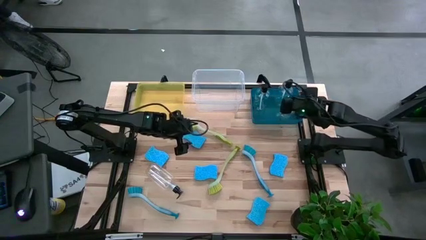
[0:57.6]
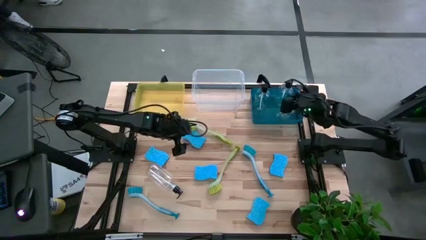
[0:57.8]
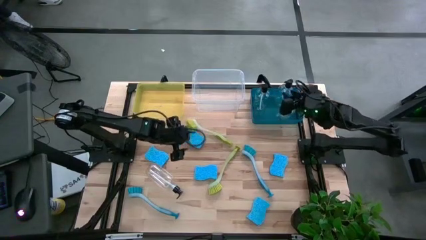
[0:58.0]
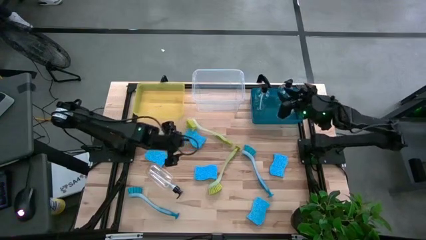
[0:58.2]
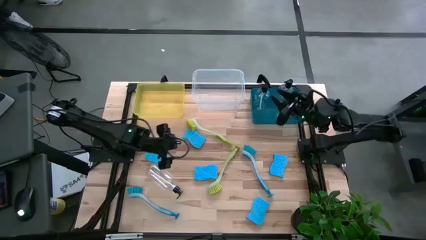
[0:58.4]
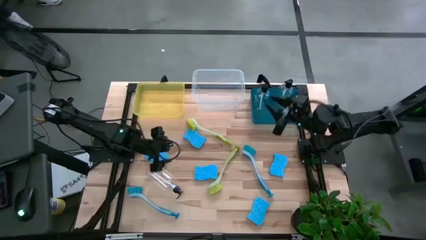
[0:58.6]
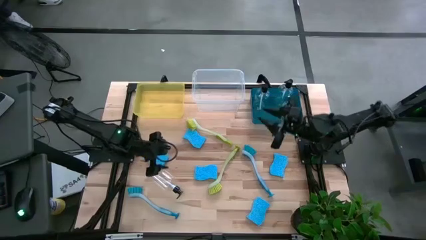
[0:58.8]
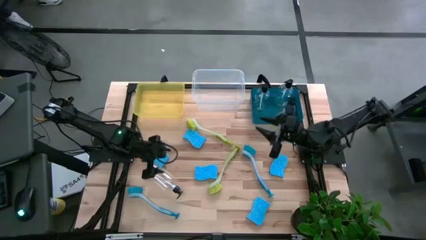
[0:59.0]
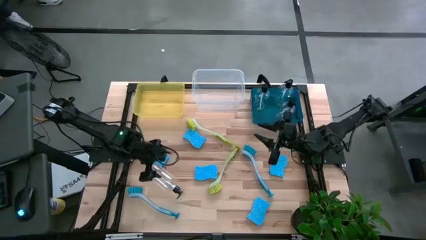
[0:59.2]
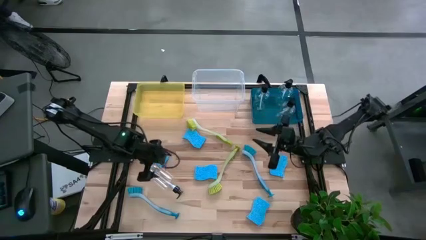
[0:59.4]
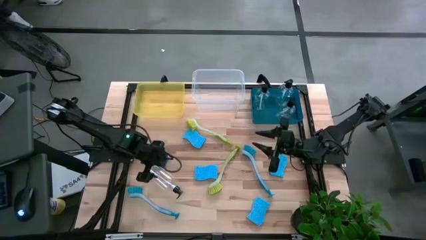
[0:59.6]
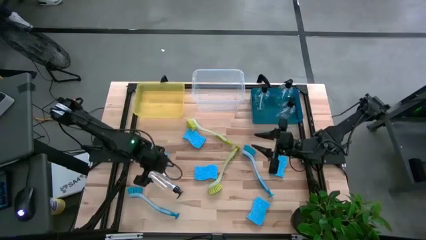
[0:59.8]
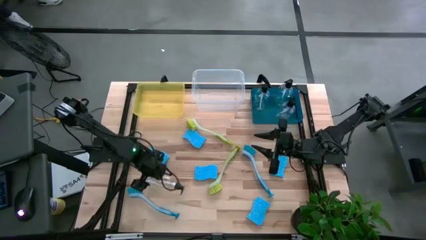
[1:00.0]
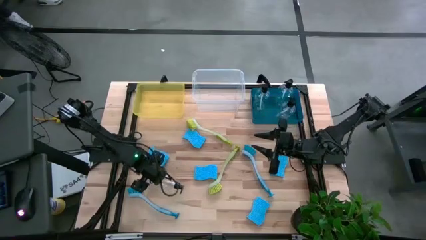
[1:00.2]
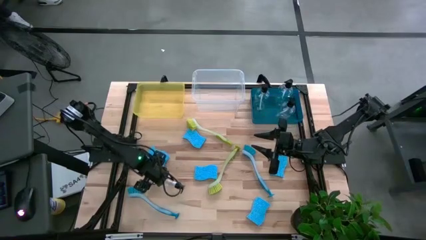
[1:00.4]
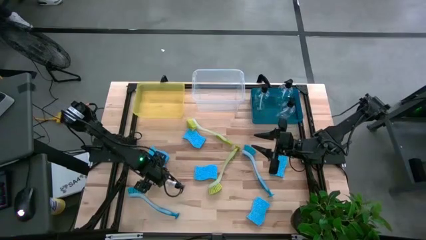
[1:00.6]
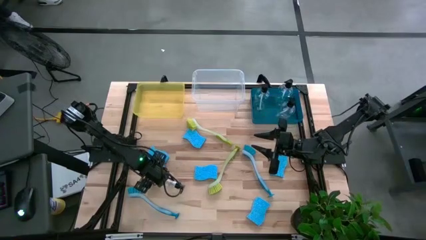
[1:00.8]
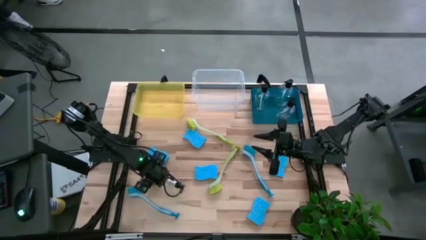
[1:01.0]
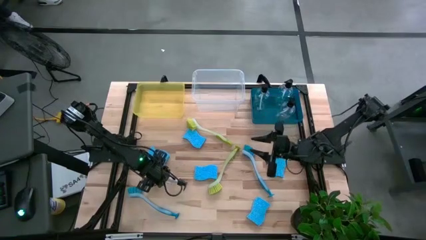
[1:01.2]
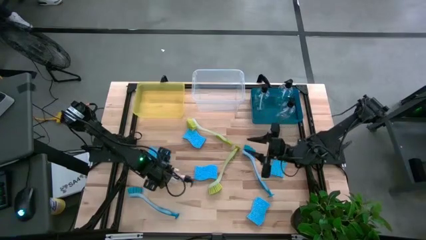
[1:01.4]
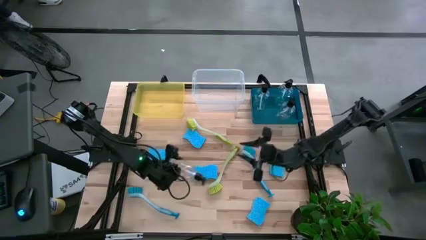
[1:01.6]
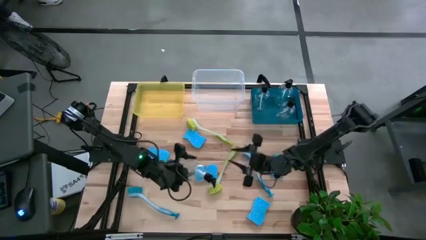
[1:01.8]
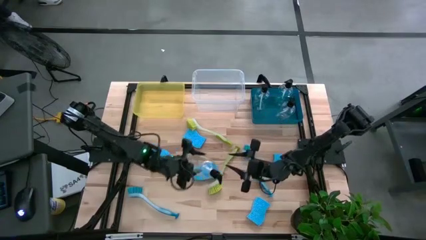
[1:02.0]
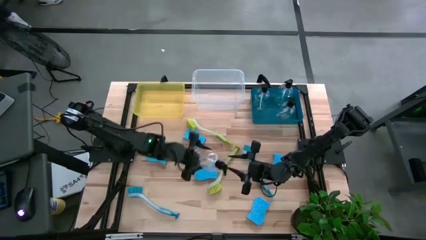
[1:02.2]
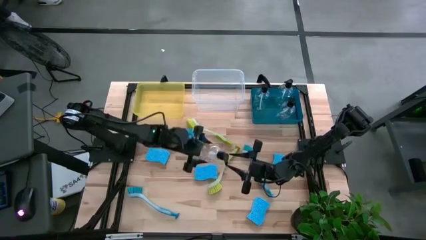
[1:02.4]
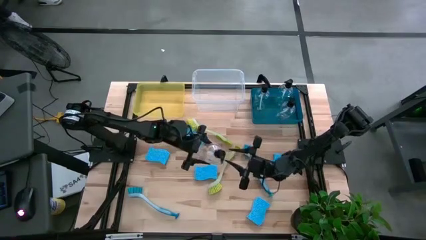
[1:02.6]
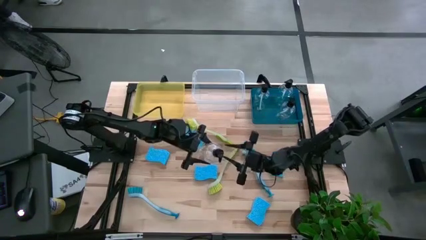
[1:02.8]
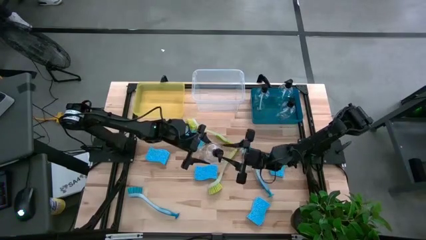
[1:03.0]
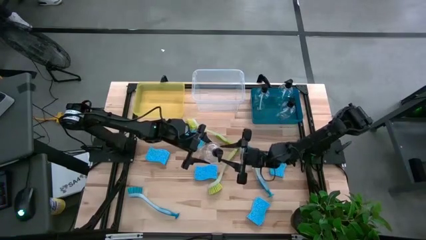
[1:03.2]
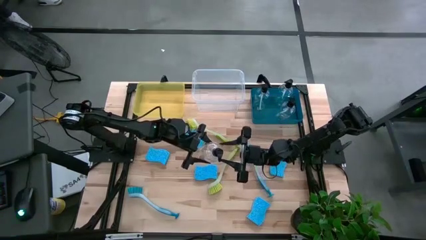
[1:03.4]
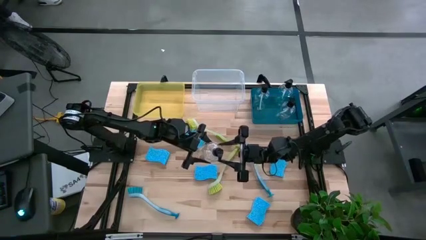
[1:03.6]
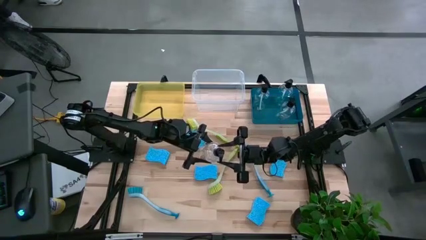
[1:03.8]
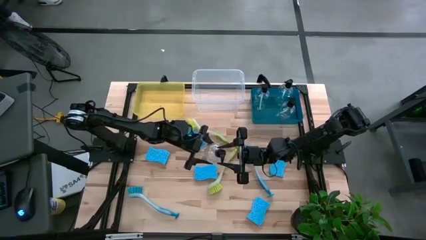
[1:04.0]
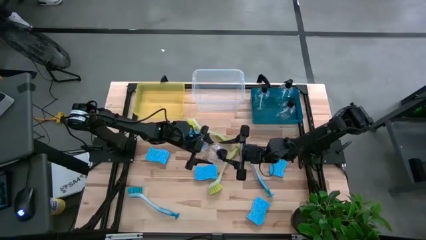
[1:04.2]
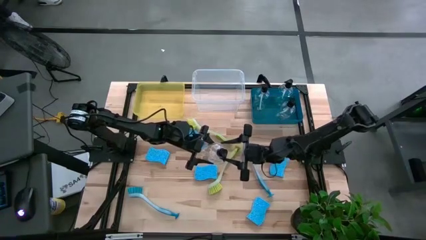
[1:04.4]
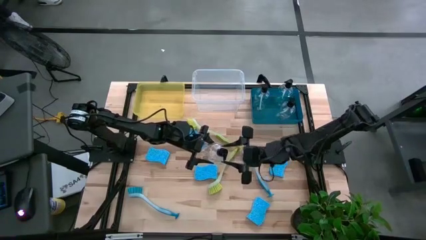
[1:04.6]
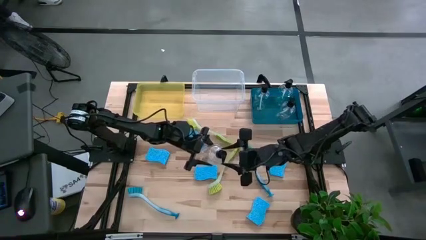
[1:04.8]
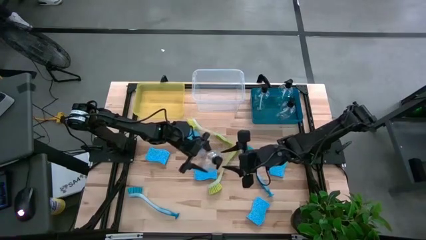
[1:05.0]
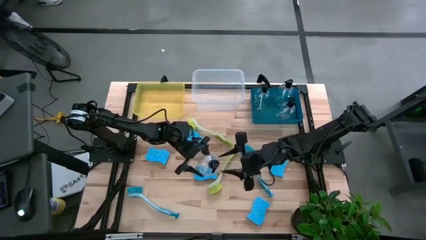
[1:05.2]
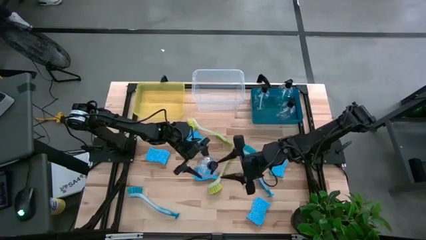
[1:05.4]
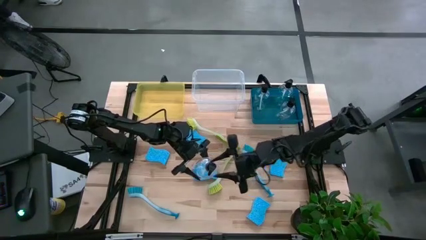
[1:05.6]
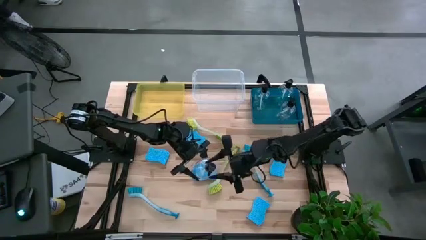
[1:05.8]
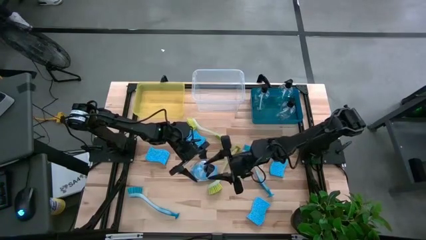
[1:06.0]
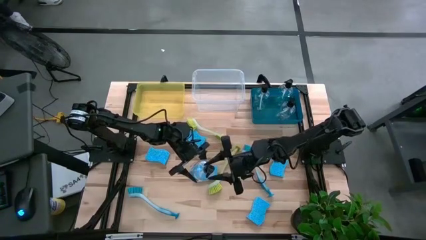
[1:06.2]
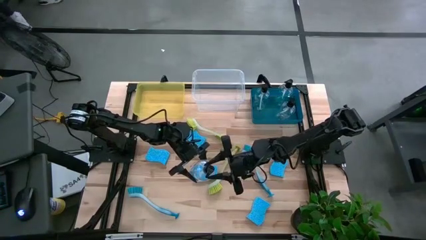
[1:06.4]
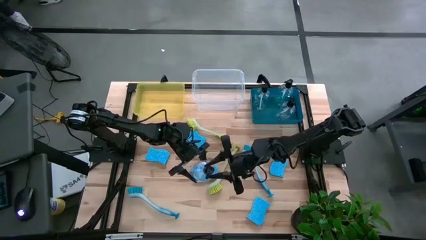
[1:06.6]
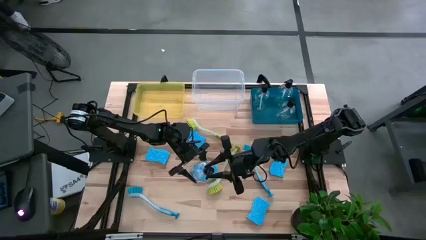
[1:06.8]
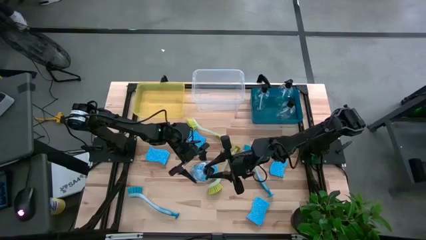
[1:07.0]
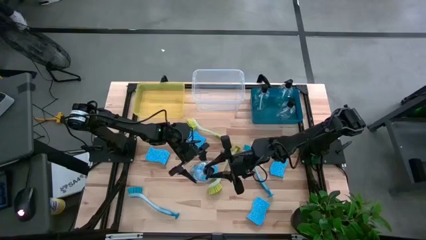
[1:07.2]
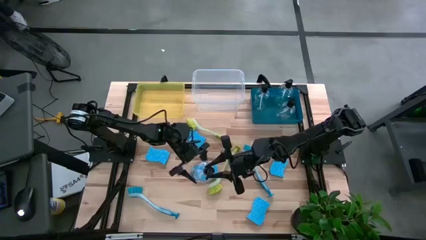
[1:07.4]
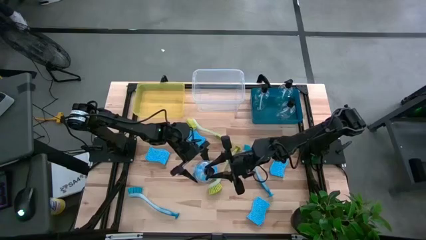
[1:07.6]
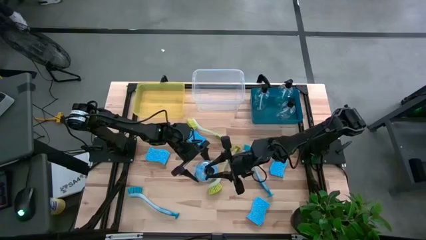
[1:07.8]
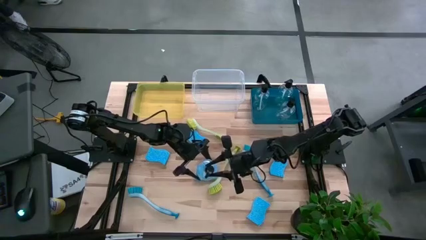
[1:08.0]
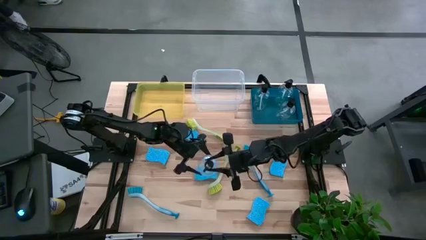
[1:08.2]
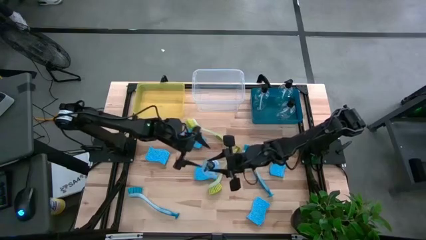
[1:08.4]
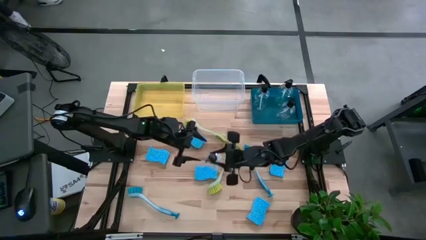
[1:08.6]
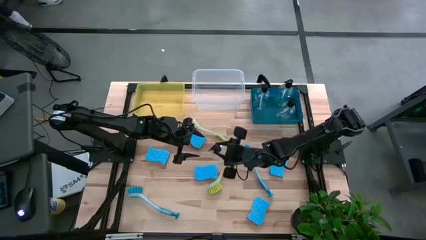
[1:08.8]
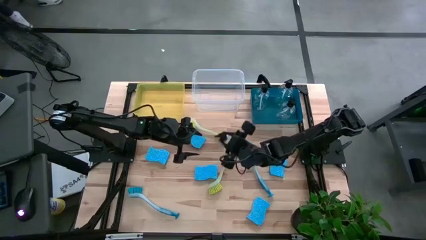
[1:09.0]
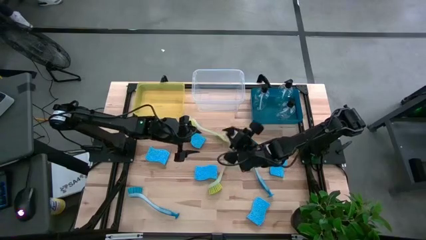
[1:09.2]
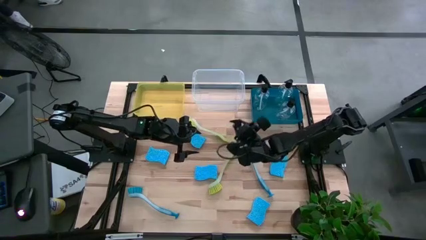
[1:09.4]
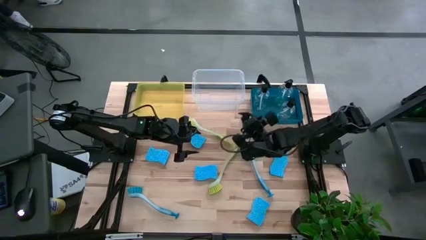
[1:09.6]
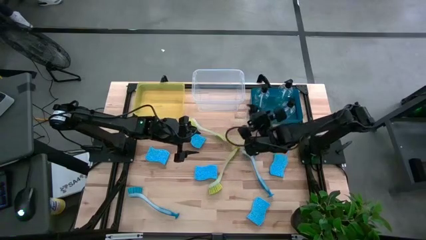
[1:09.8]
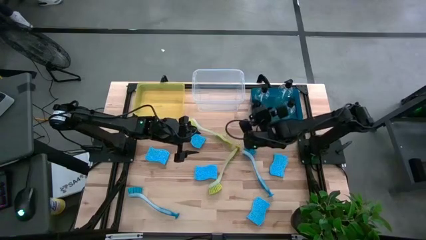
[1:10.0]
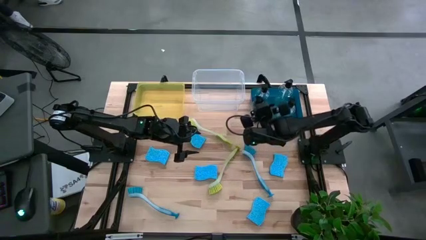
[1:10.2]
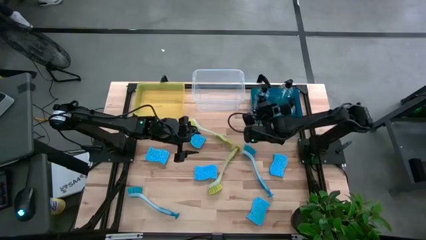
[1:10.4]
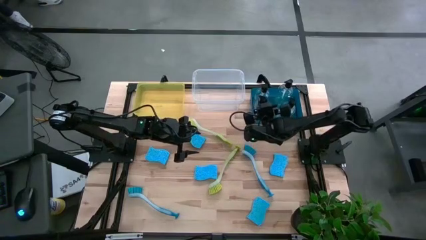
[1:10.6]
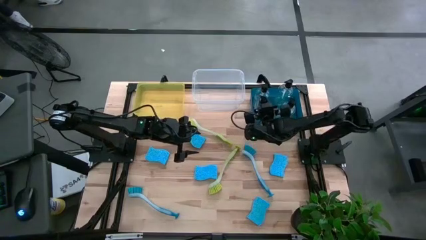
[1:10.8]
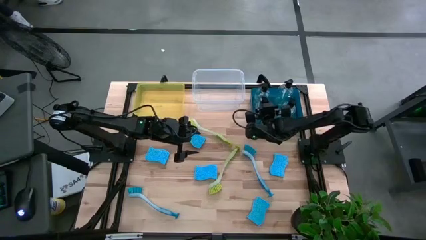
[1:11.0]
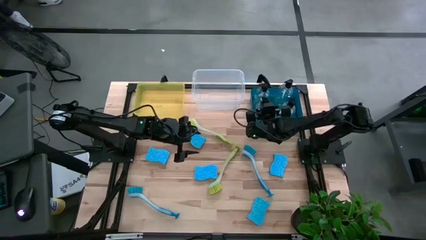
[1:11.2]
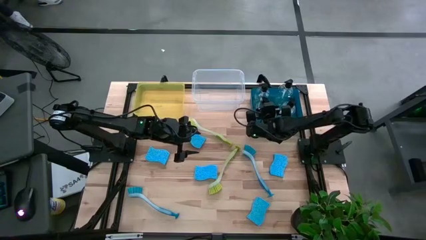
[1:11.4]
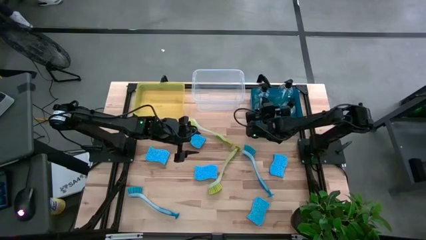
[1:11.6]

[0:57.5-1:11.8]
Task: Pick & Place Kitchen Sink Supplies
Put the transparent spray bottle into the blue bin

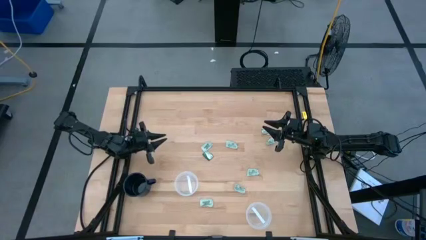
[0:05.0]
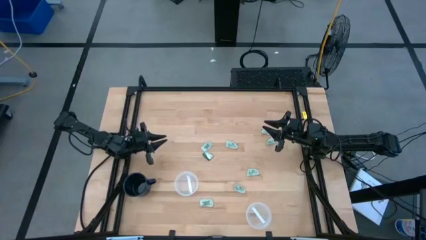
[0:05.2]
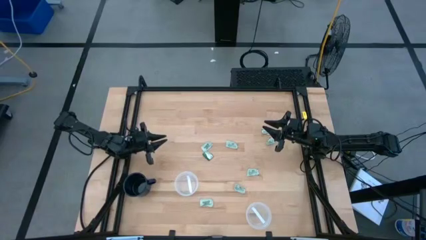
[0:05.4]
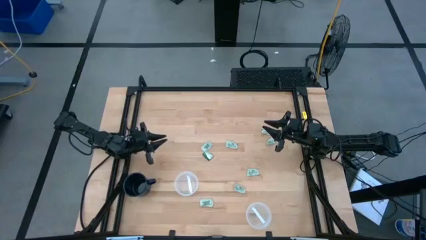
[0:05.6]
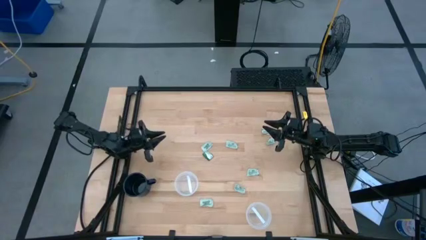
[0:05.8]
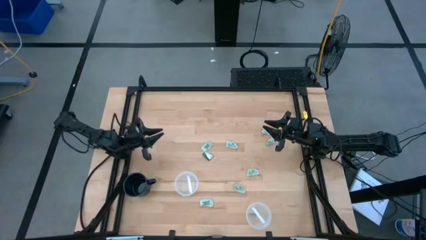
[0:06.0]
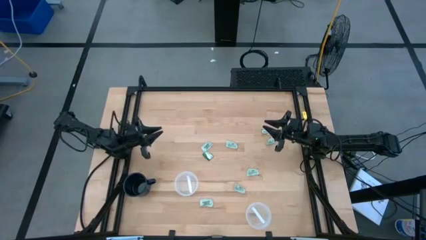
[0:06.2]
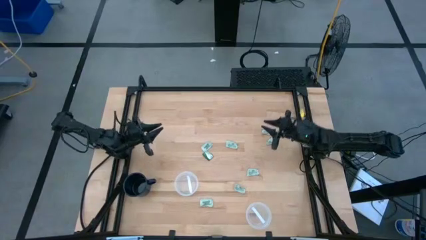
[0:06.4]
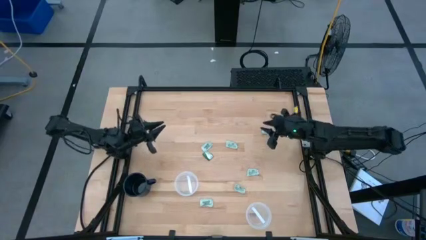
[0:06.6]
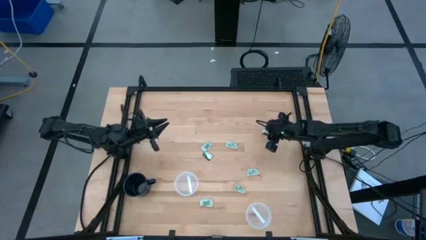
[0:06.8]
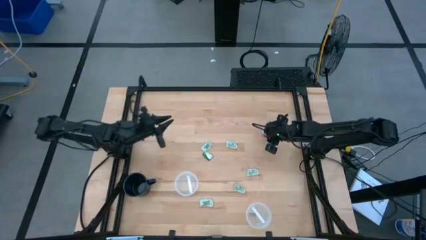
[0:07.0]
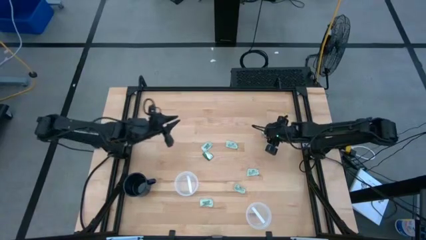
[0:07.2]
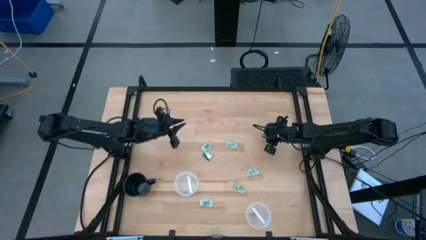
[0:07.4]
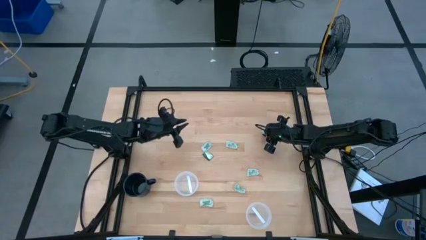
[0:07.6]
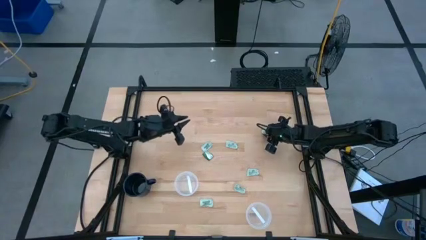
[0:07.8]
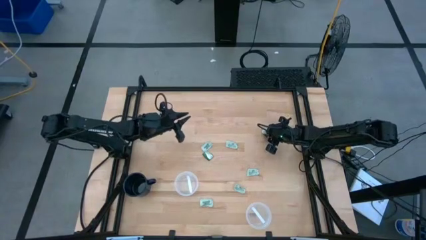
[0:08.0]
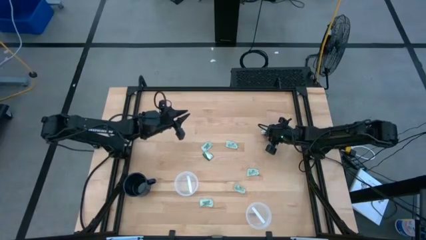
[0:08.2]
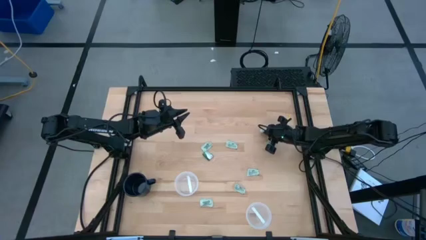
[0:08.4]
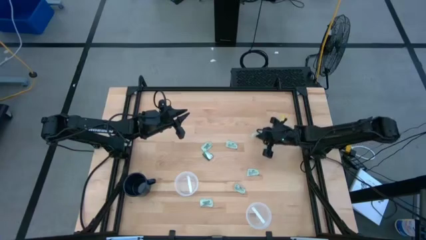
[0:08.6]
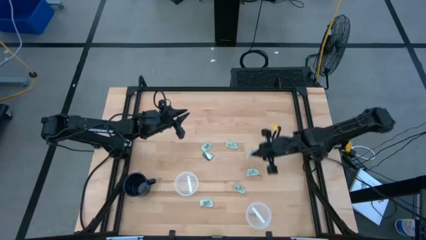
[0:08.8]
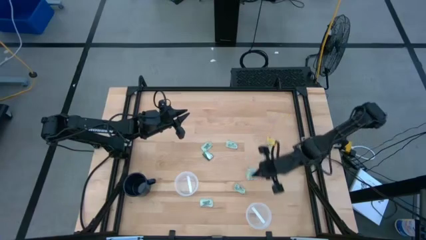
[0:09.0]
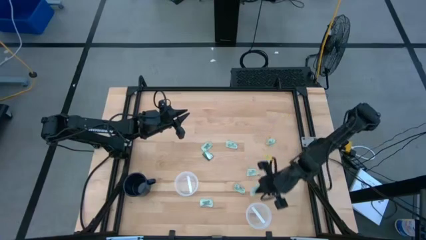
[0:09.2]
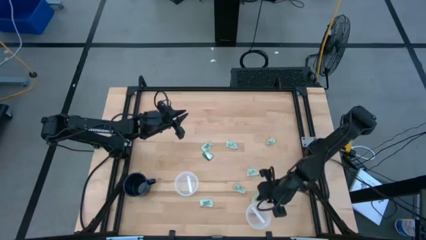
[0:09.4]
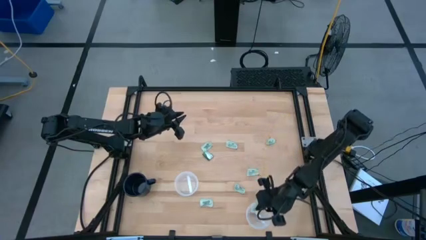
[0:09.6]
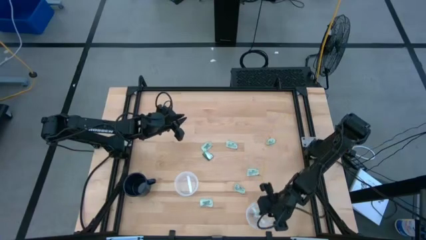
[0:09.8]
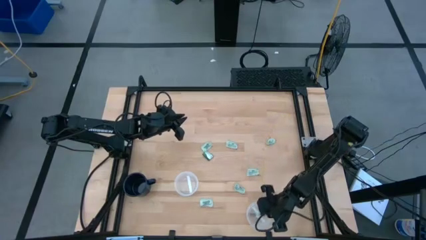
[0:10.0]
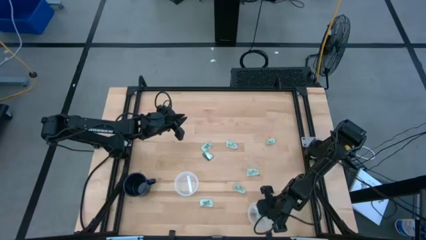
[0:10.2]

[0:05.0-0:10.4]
Task: Pick and place items into bin
Put the stevia packet into the bottom transparent bin
